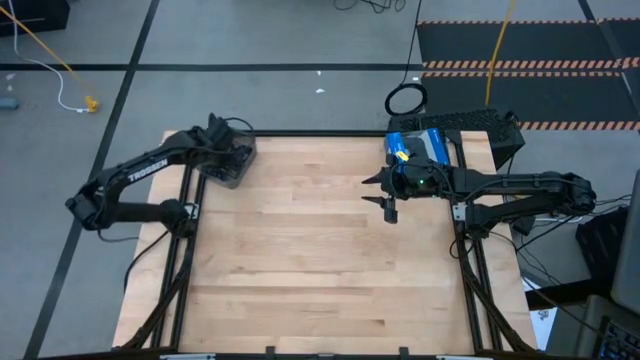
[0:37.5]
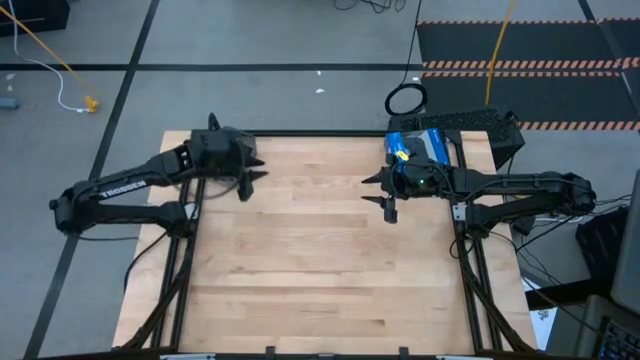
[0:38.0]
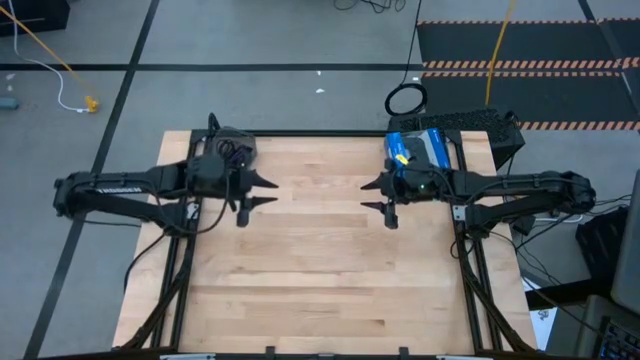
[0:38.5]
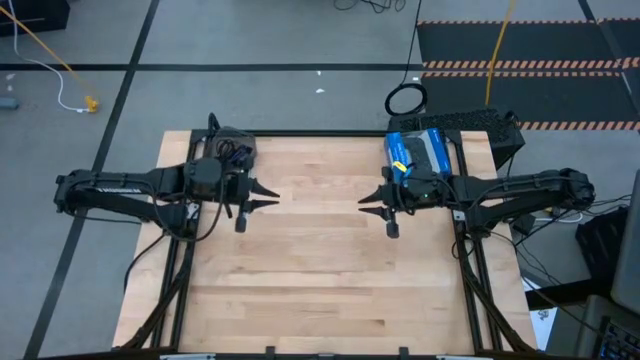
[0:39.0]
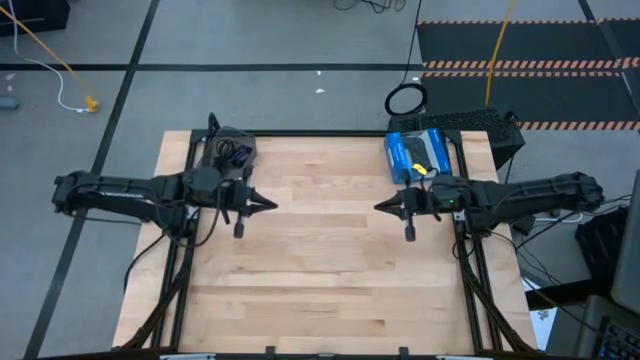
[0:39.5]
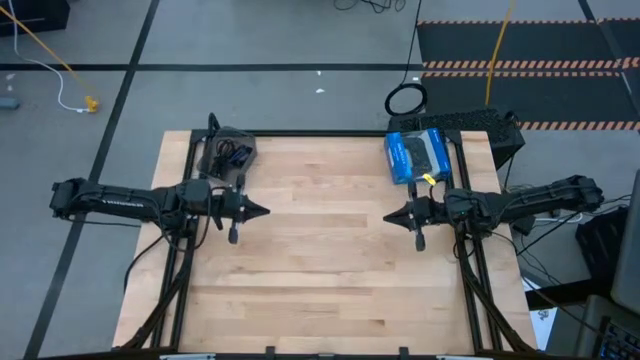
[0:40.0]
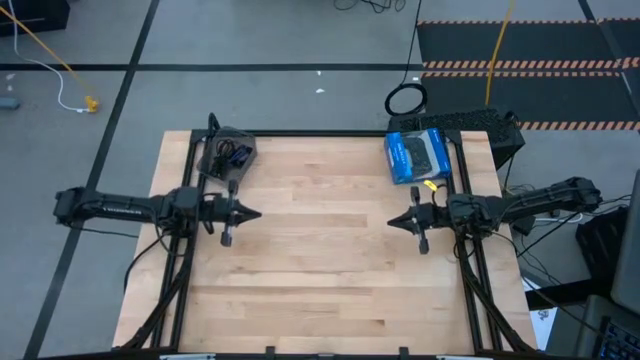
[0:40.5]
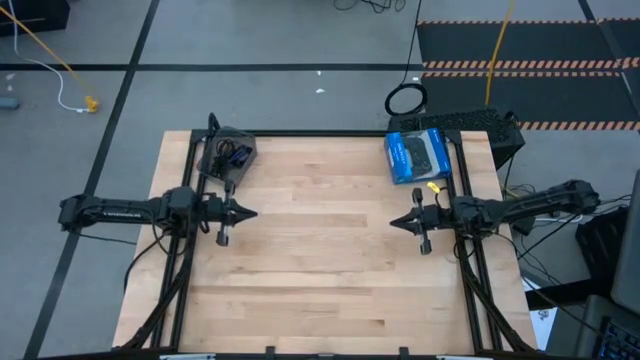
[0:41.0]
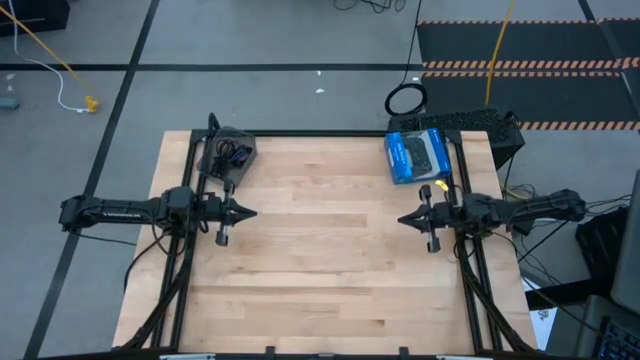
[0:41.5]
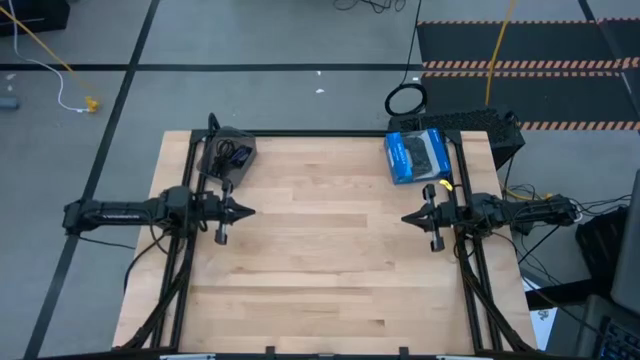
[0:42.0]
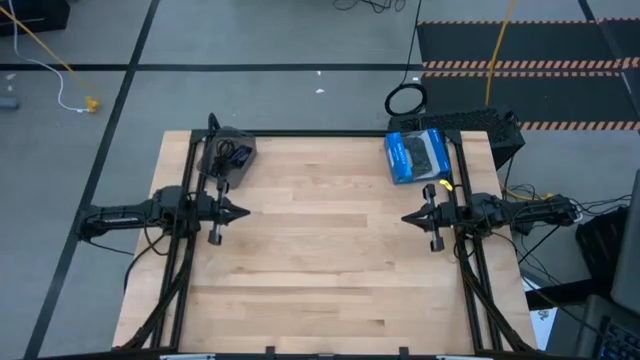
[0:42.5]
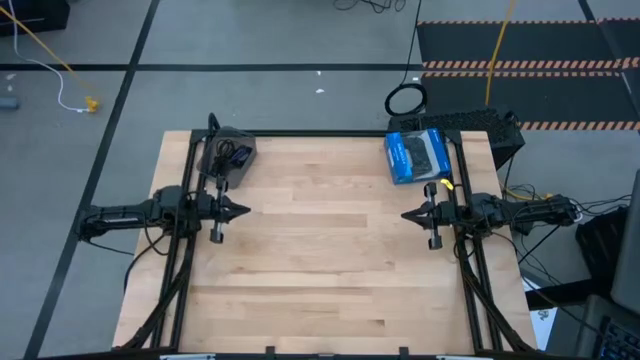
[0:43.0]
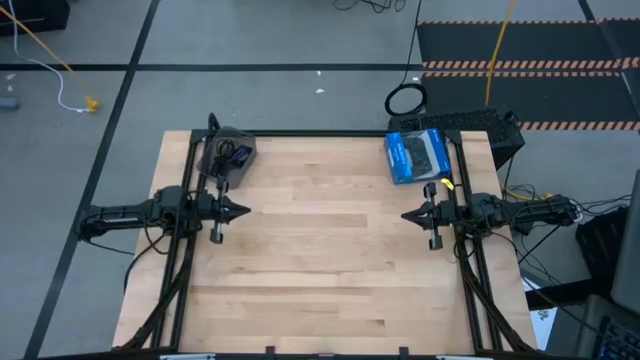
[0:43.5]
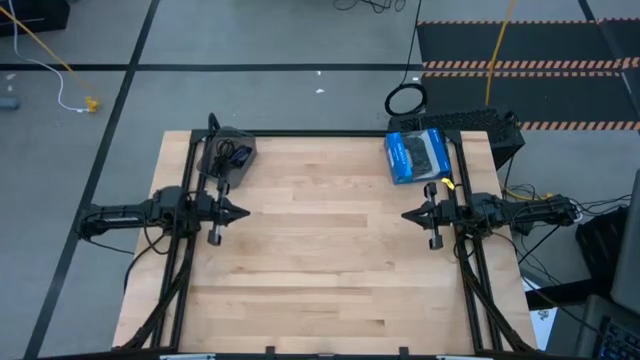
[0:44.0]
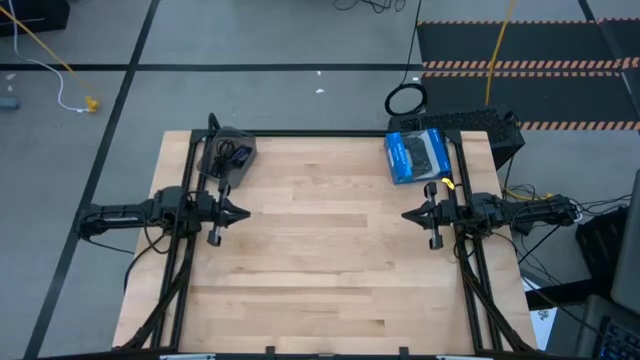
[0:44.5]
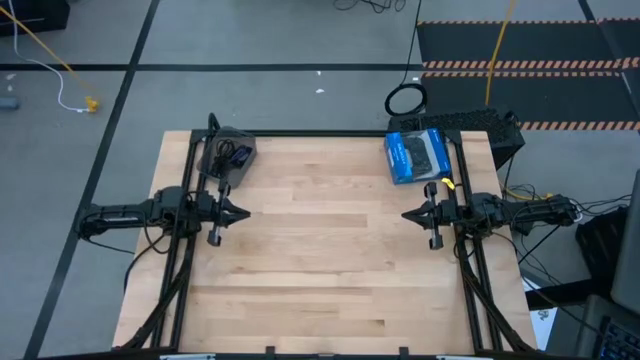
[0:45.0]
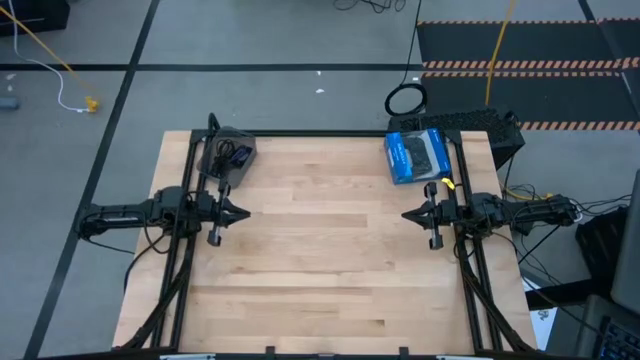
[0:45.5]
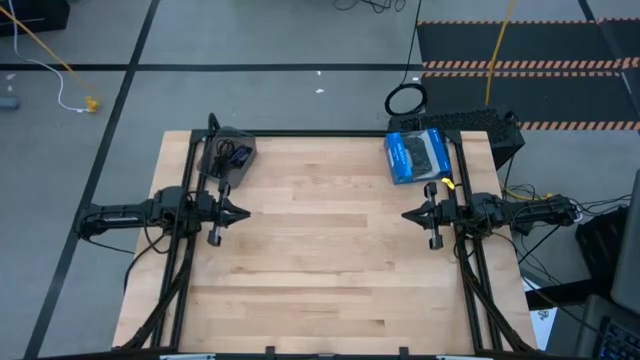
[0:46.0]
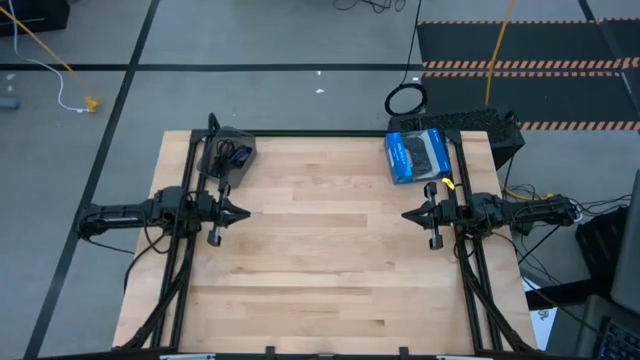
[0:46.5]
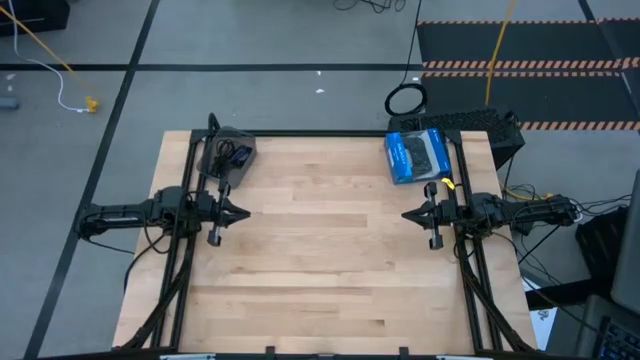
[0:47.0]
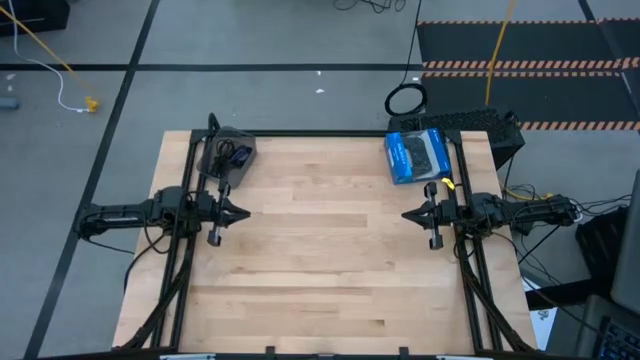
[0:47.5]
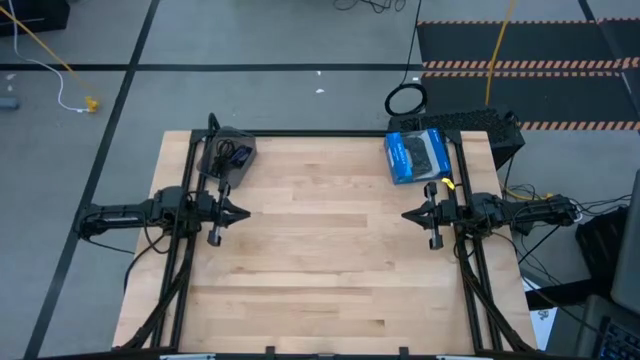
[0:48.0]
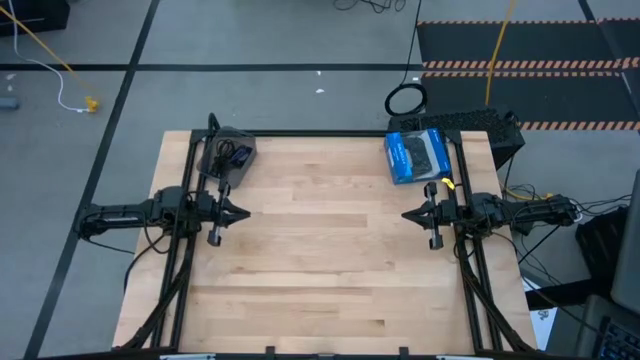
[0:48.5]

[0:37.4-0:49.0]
Task: Pick and place USB-C Cables
Return to Home Position

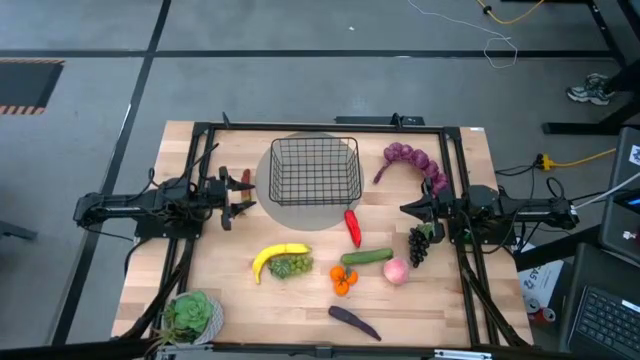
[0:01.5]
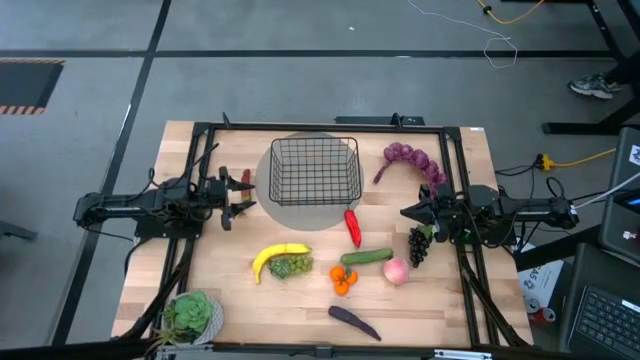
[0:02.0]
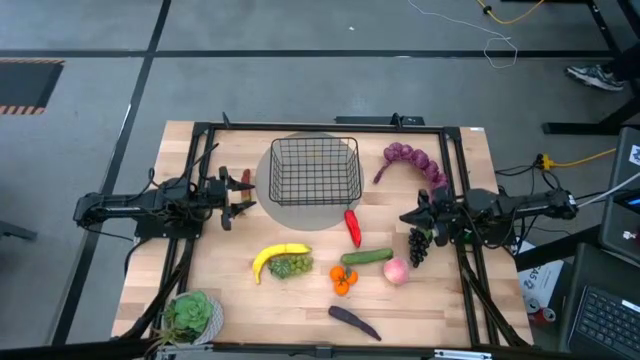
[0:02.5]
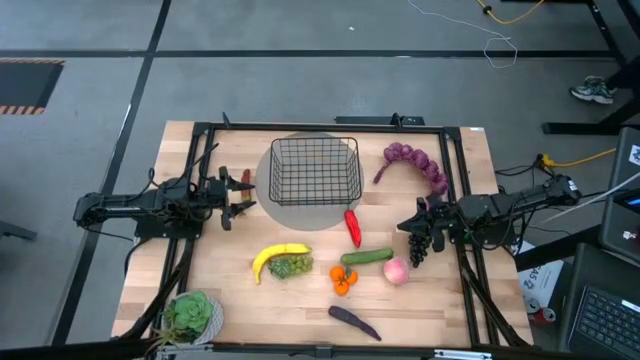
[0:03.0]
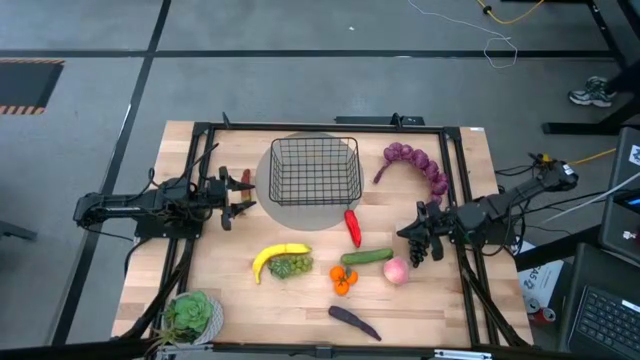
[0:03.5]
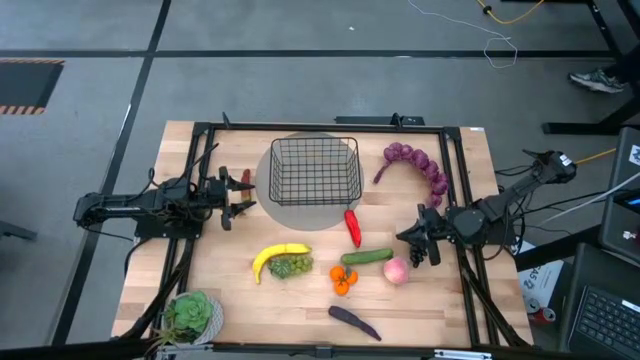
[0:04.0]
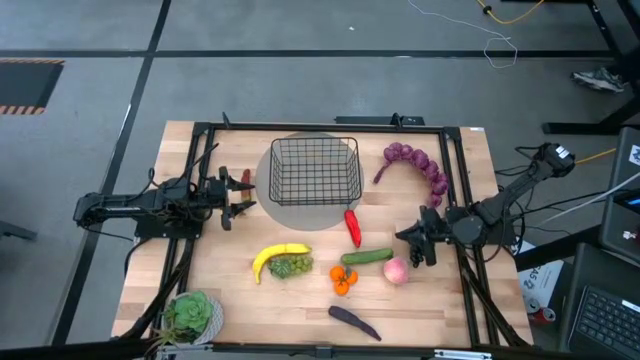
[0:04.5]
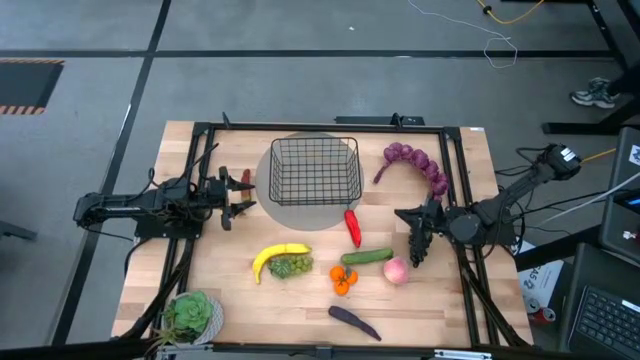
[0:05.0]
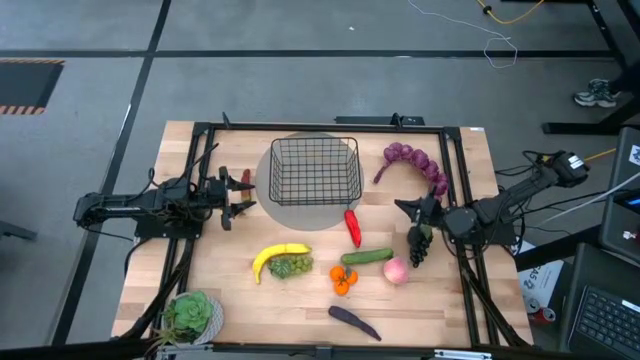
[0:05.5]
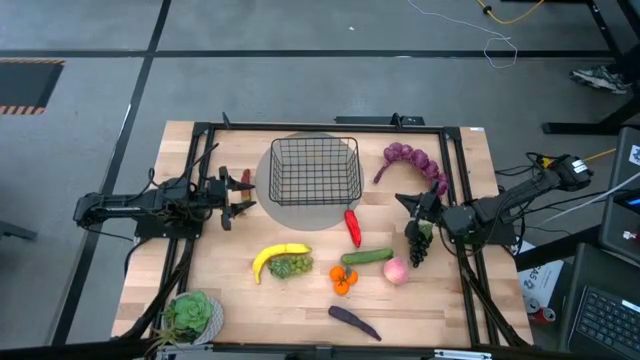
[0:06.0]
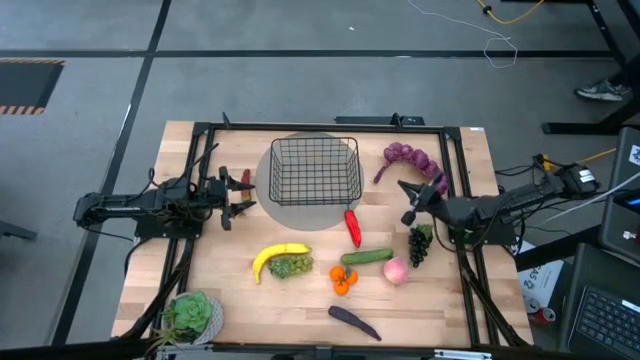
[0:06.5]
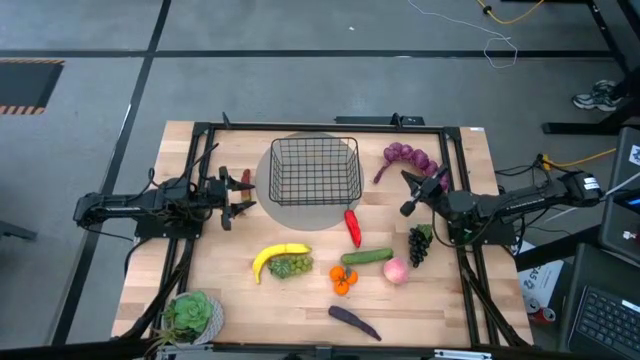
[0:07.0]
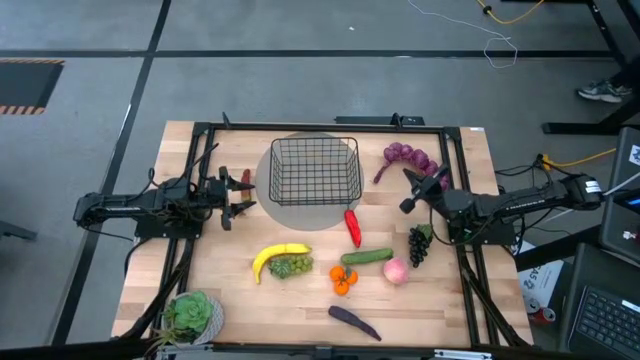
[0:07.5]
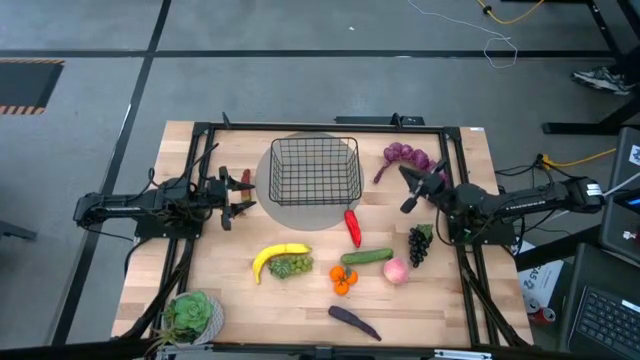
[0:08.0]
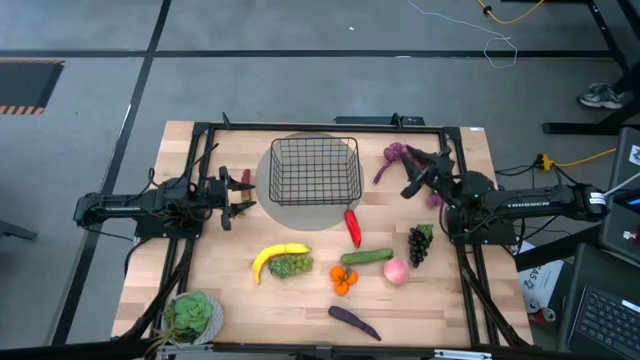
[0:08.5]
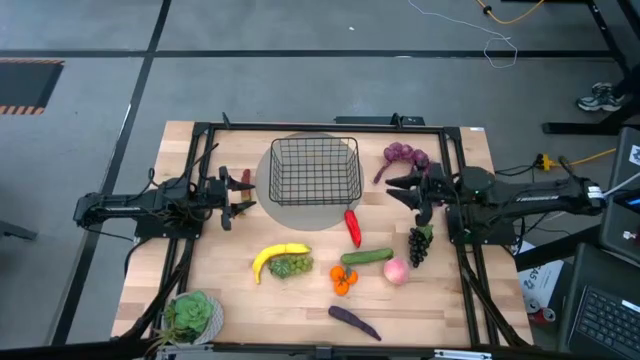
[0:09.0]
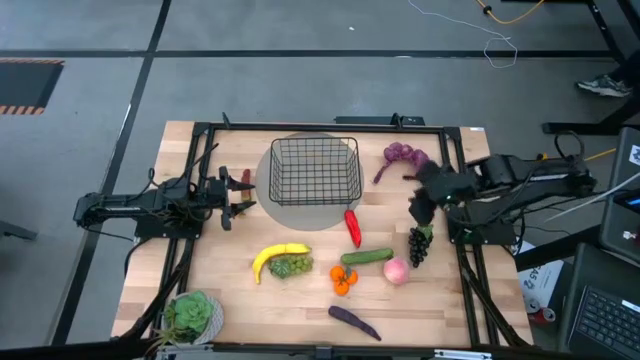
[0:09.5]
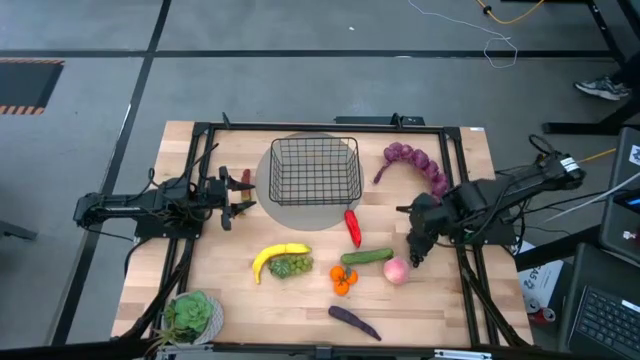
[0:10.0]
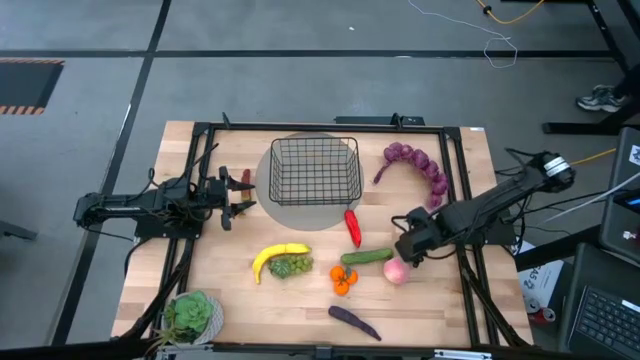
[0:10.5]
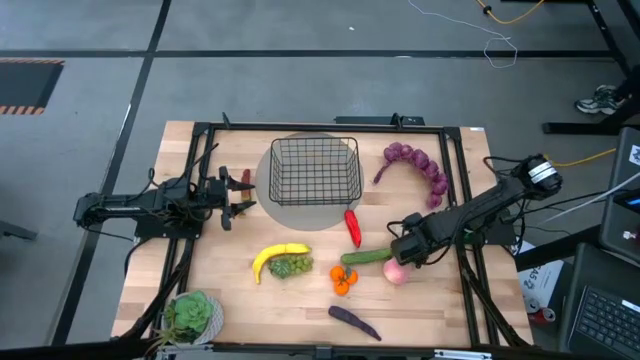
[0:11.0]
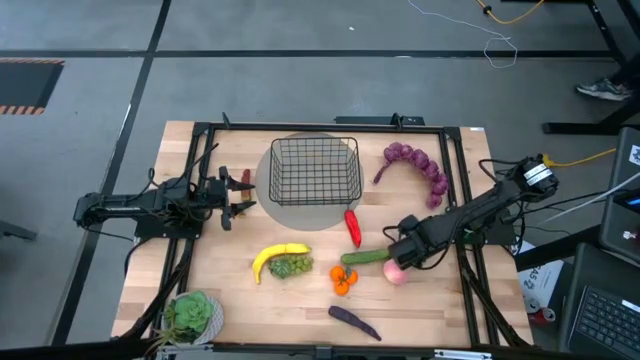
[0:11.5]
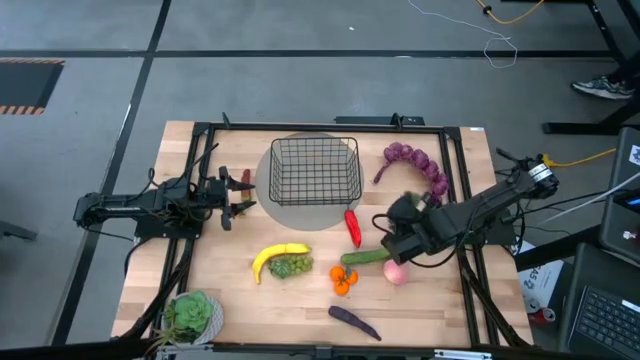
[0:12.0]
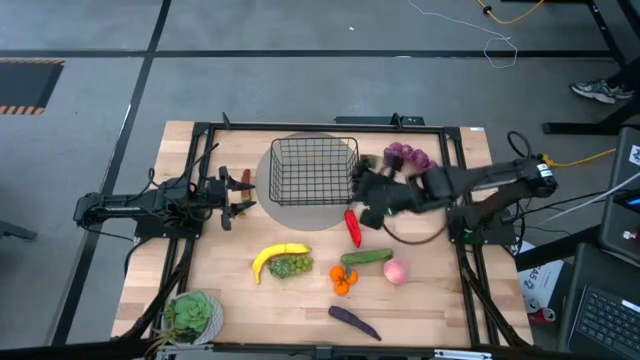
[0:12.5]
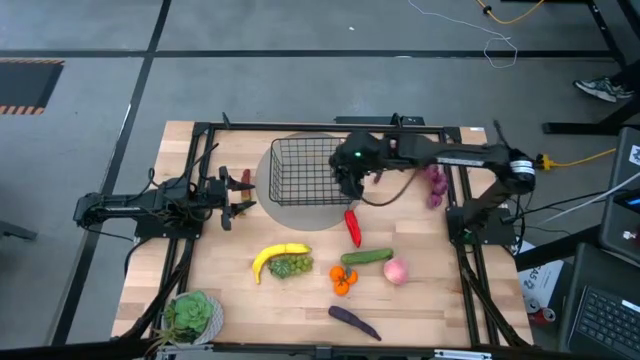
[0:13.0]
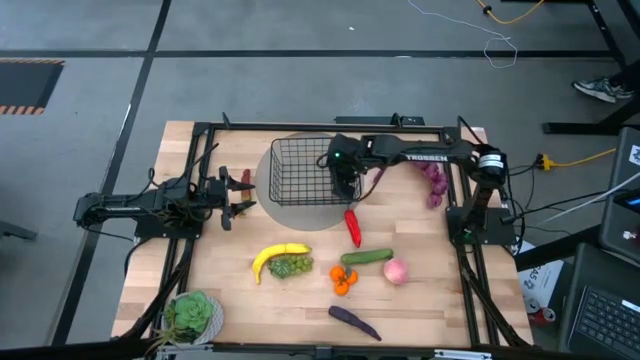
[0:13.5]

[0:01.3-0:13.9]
Task: Build produce basket
Put the black grapes into the basket
